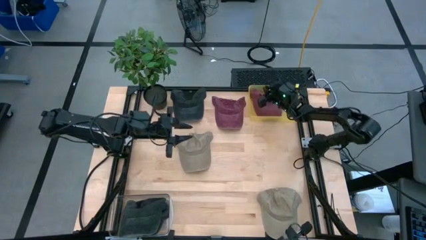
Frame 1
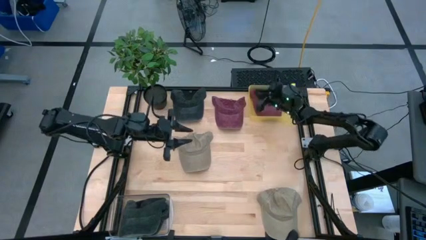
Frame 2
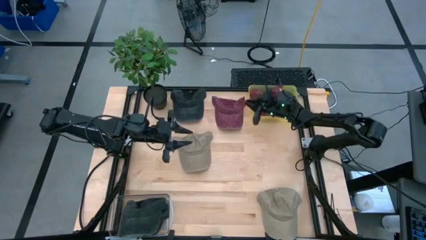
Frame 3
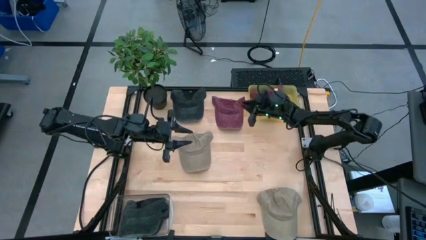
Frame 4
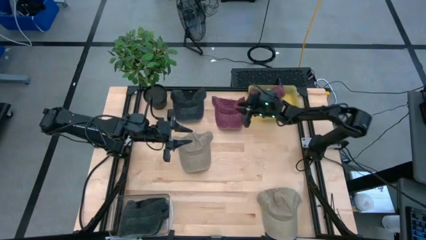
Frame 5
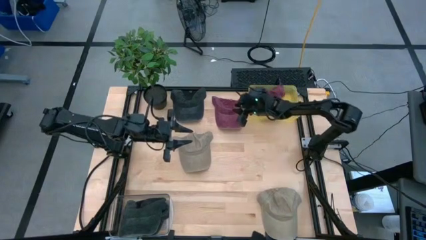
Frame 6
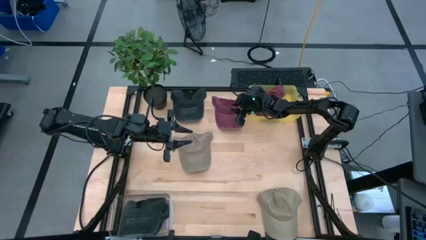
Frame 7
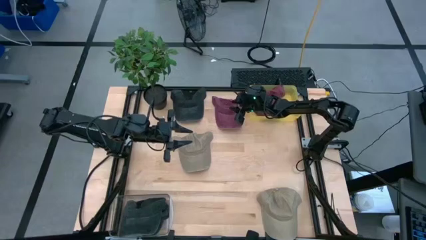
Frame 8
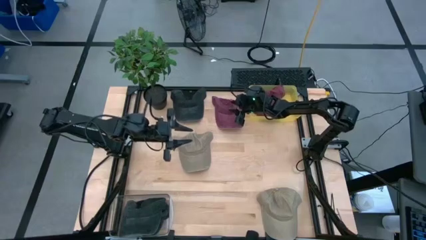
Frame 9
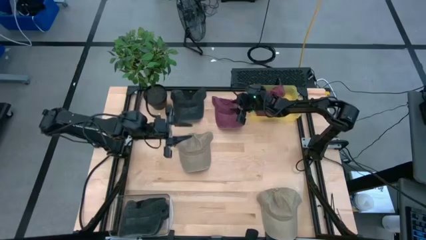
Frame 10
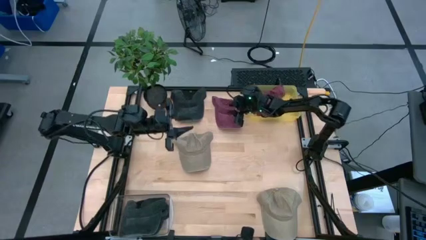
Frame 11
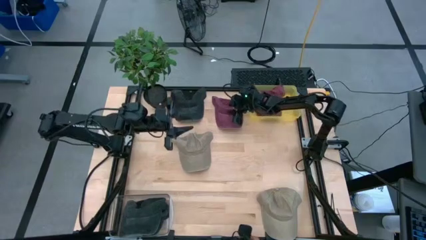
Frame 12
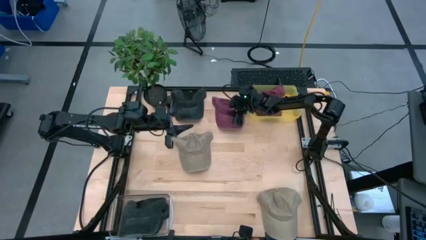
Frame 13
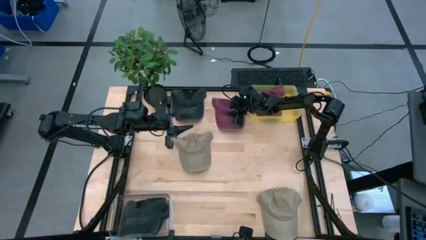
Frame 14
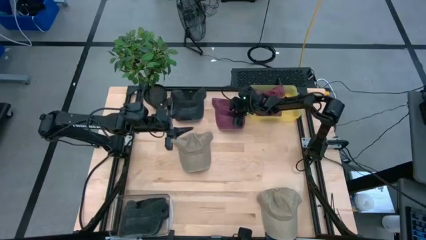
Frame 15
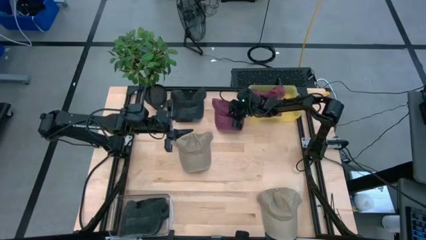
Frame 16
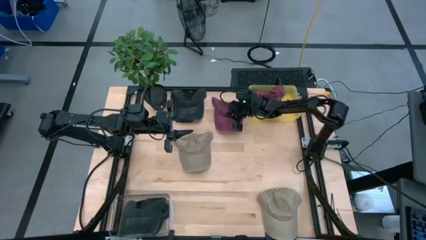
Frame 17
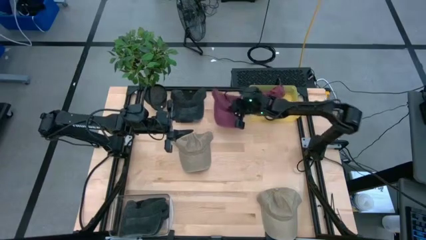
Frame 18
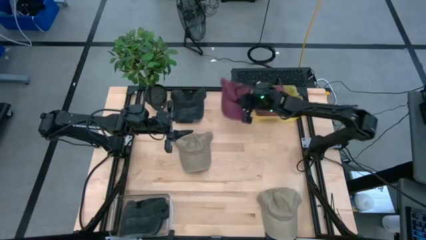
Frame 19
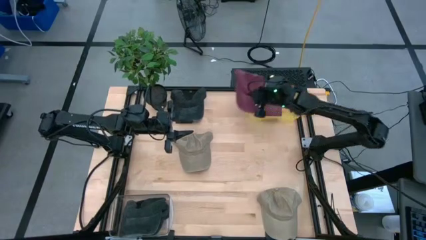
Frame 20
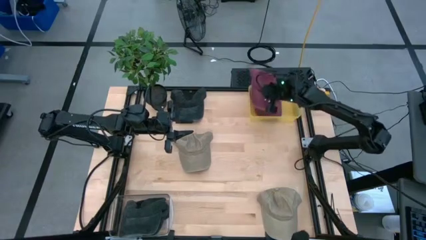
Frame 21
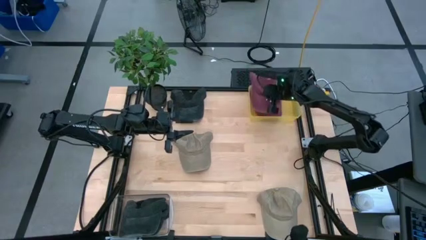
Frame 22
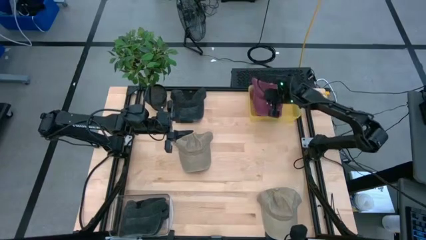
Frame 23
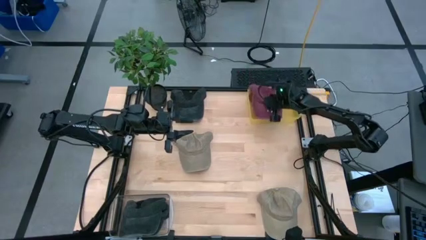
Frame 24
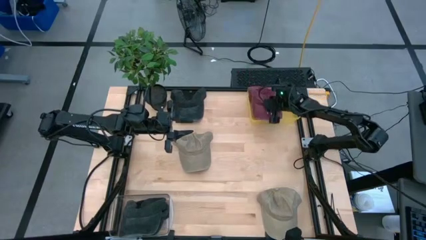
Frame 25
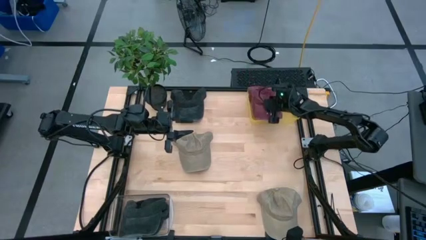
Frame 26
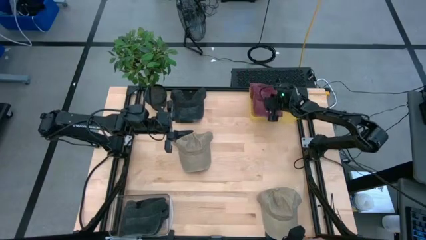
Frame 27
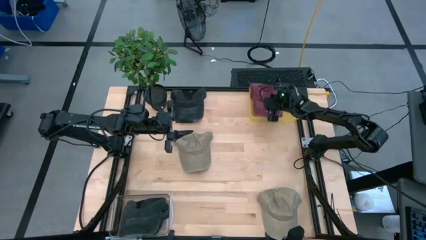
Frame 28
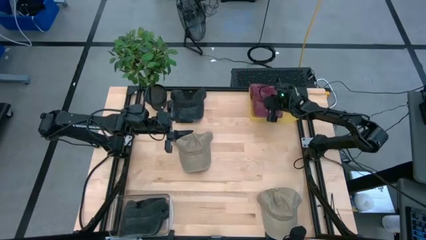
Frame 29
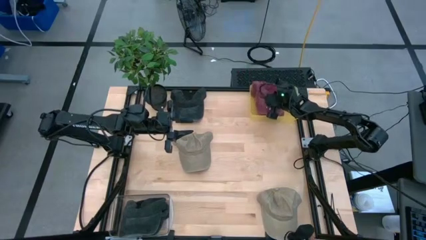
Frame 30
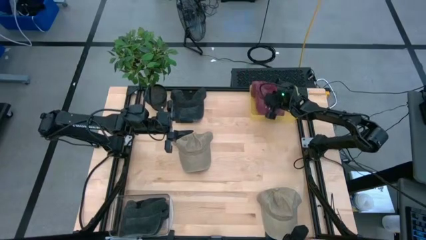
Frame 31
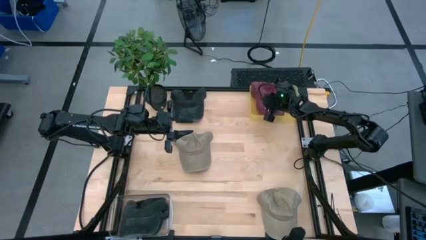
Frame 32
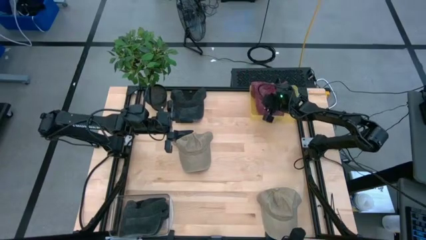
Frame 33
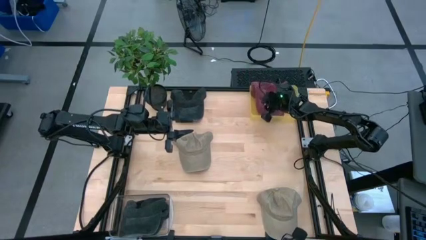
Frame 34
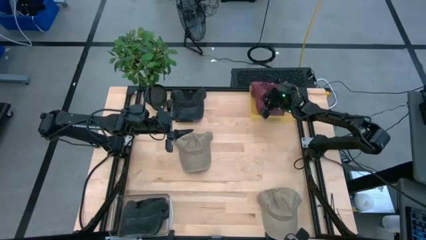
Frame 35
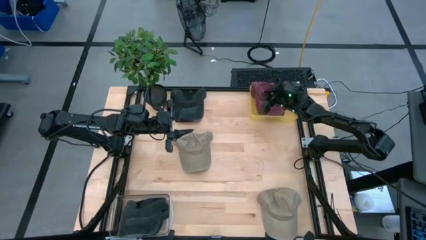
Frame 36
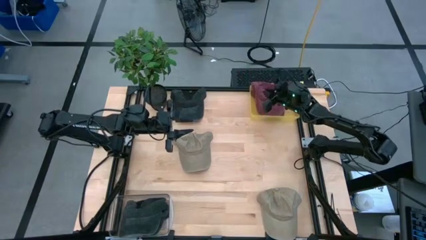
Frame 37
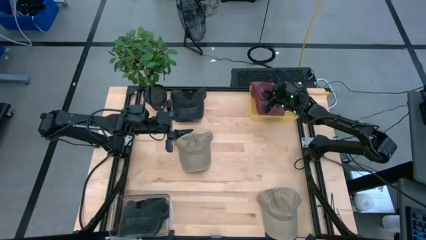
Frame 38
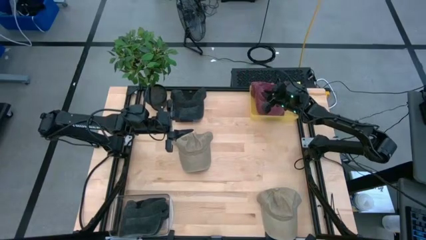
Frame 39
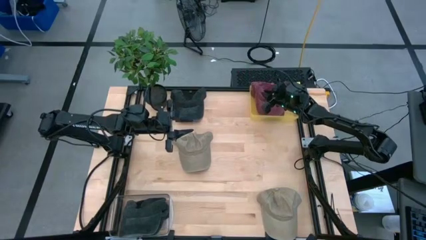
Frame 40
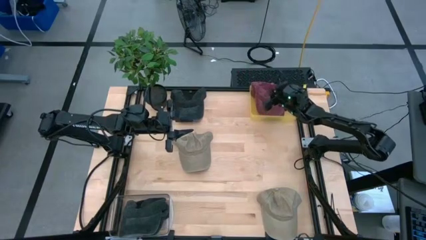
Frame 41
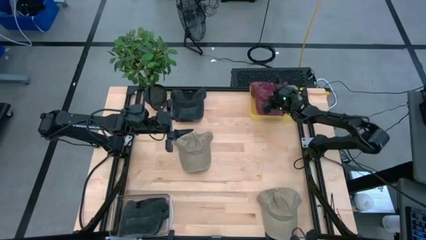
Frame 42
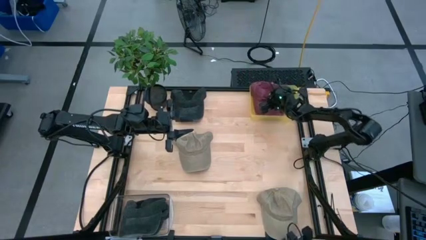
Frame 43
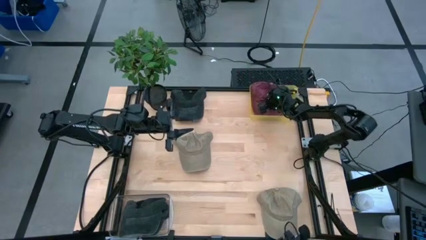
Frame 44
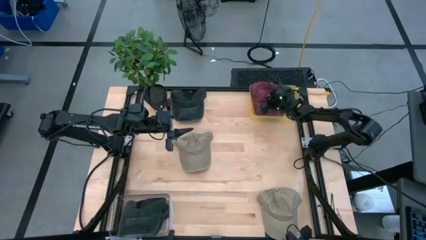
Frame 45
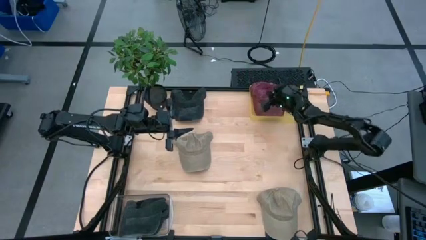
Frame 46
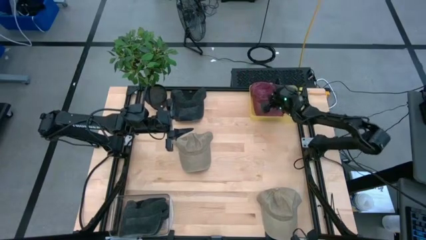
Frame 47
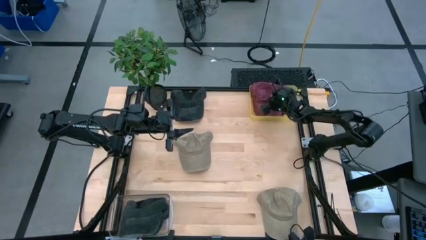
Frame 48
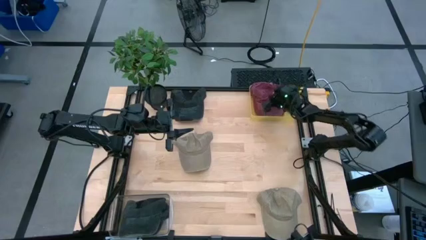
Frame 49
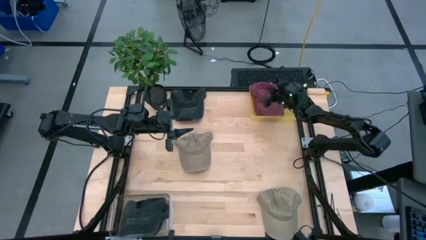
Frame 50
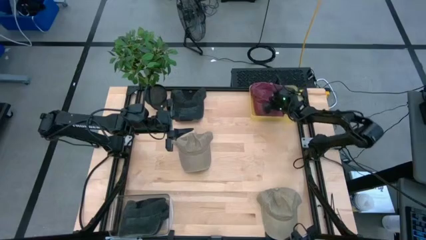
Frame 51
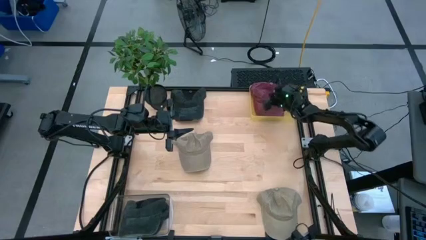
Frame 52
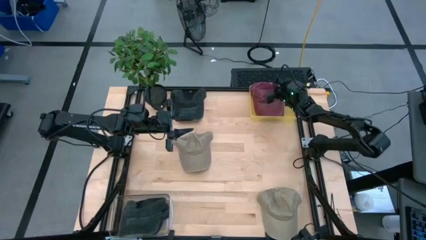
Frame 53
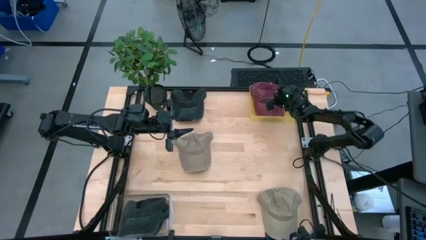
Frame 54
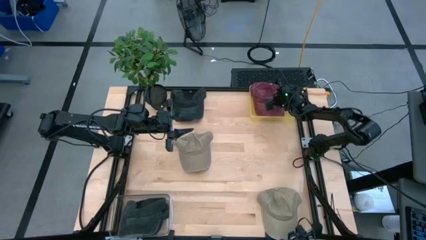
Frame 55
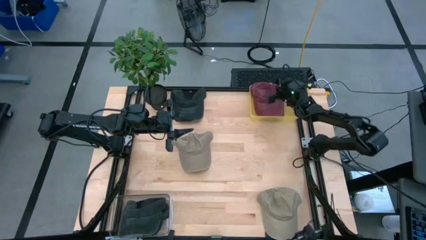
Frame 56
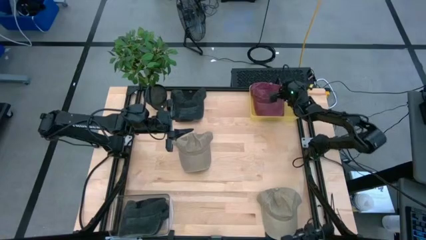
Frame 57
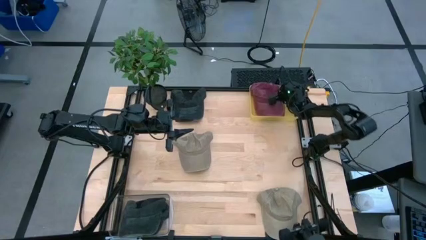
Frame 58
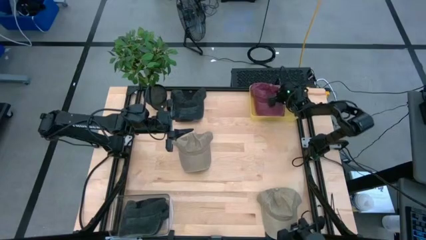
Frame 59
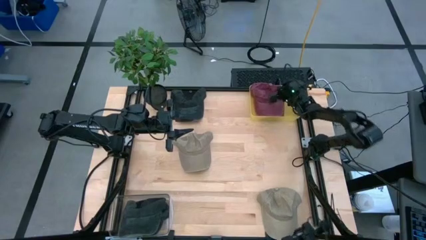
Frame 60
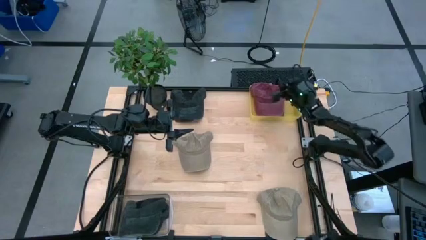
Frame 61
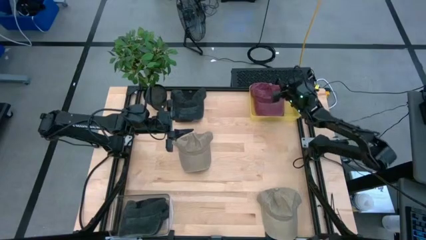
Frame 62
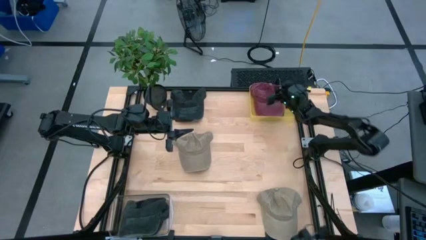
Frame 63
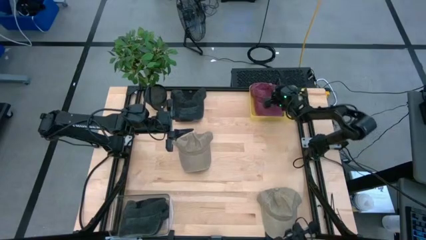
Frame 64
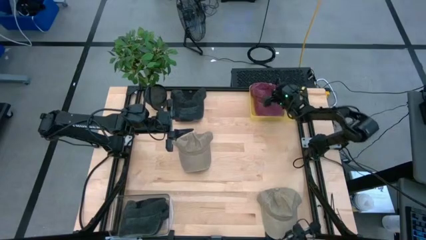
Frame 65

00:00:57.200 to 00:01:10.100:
Task: Pick & Place hat
Put the red cap into the yellow bin

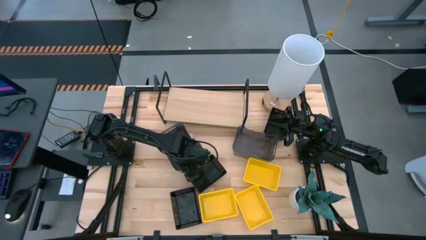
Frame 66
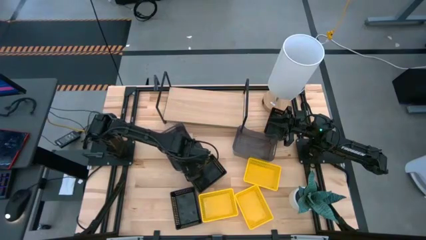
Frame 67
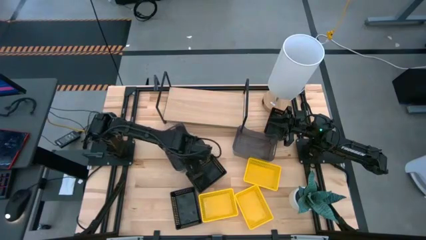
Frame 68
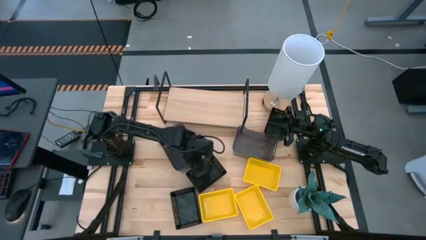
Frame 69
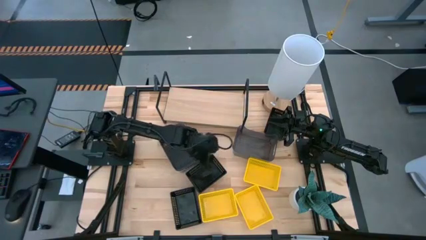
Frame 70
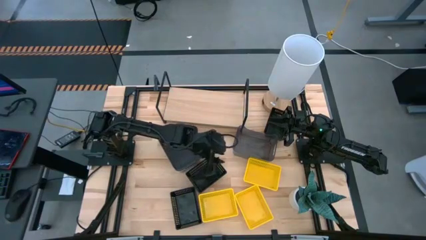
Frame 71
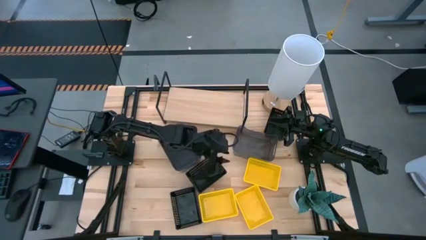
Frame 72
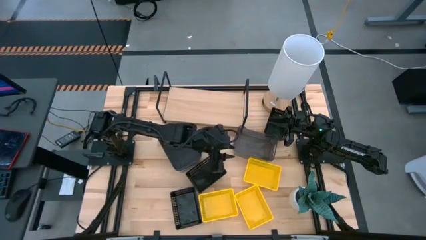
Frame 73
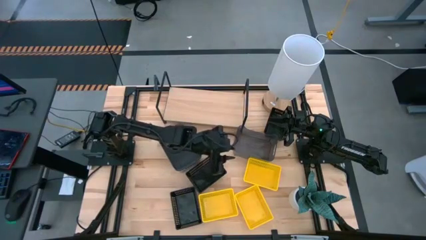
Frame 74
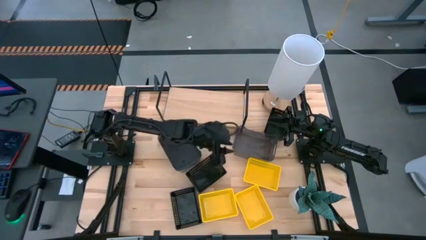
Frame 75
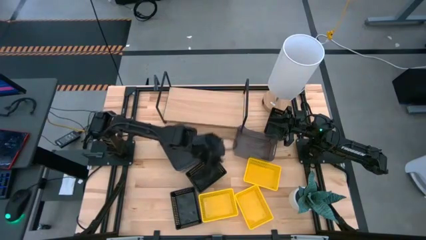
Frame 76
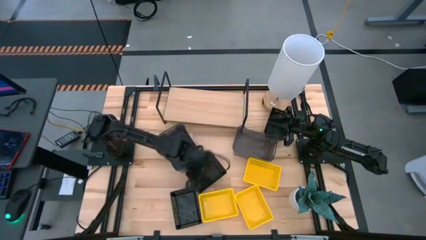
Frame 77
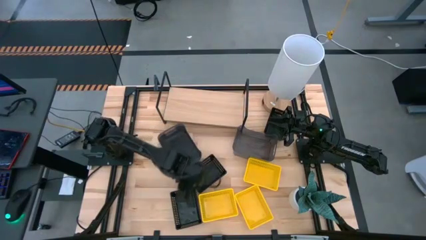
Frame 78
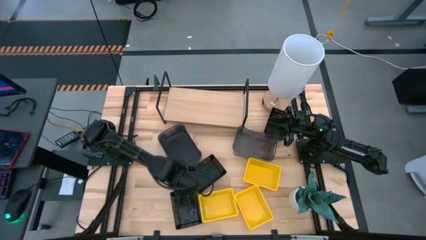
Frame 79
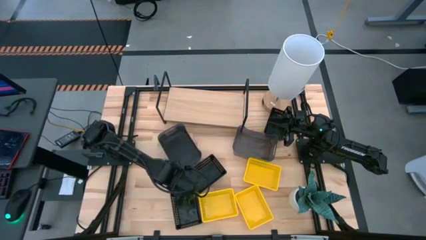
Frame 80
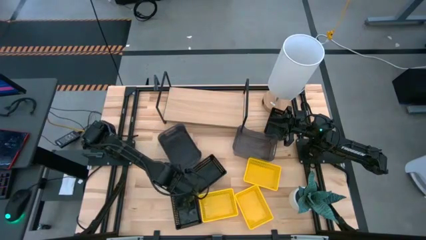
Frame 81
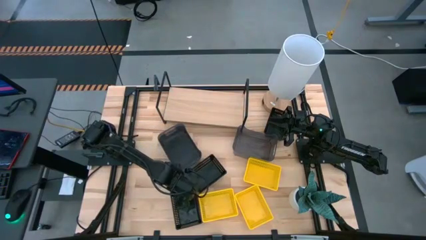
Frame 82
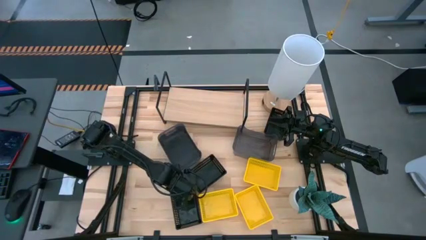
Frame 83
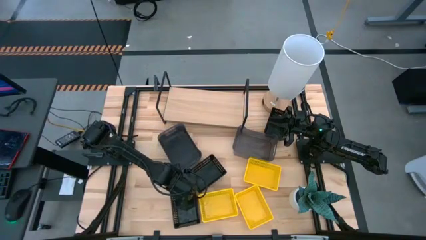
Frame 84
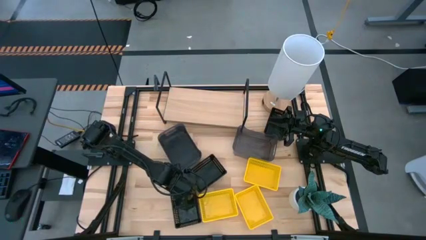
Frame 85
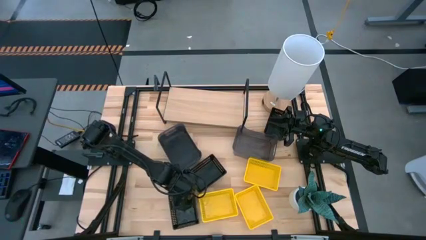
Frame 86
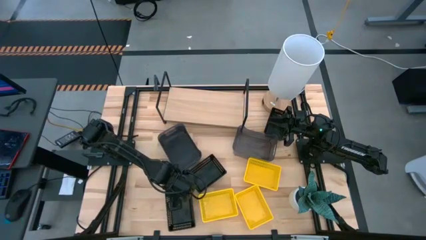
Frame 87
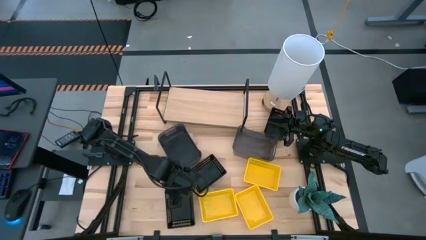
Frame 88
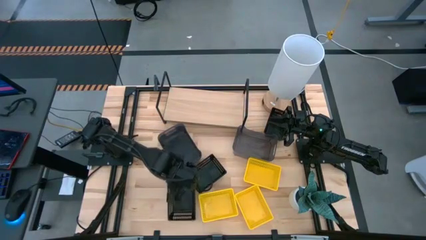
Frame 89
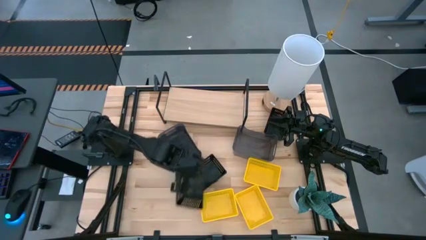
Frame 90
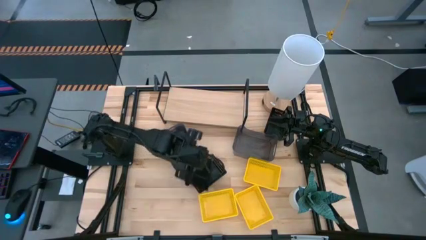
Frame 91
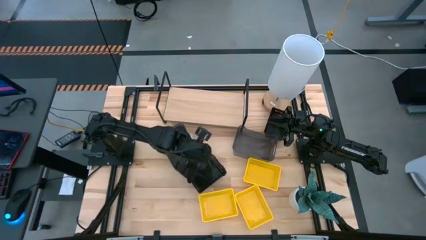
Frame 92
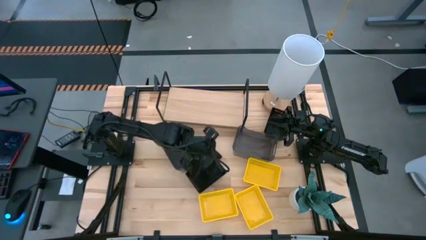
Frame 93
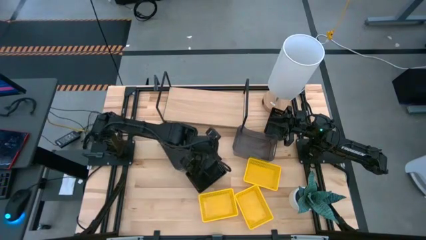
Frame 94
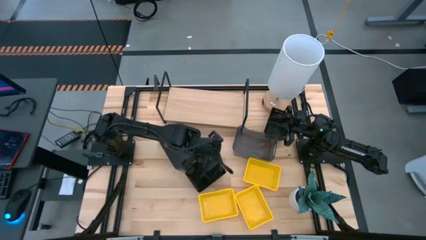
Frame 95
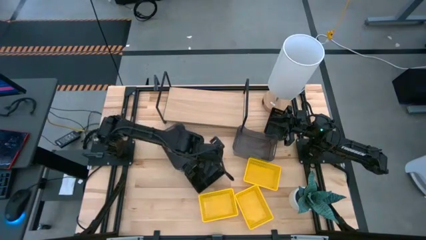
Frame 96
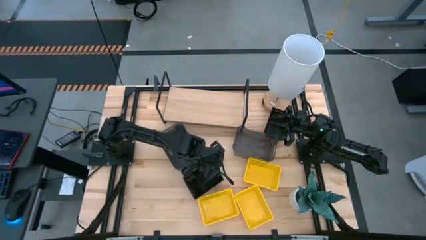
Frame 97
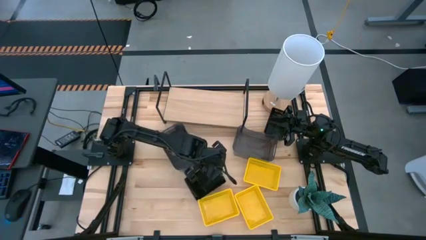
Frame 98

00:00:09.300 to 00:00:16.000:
Task: Stack baskets on shelf by color
Stack the bottom black basket on top of the middle black basket
